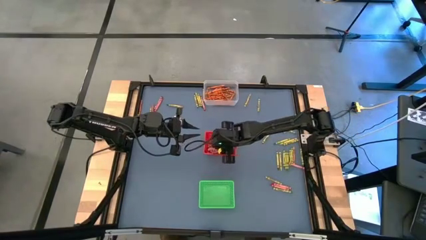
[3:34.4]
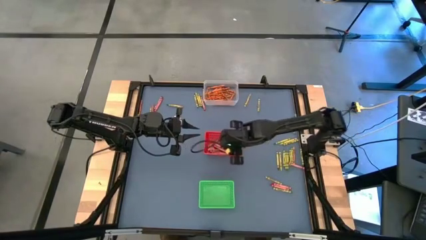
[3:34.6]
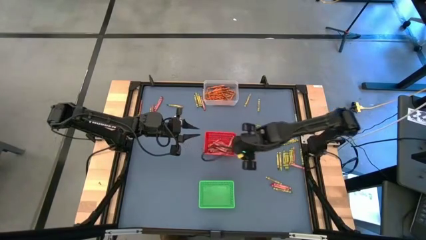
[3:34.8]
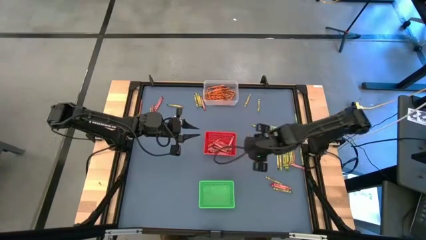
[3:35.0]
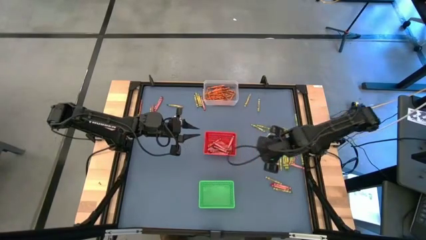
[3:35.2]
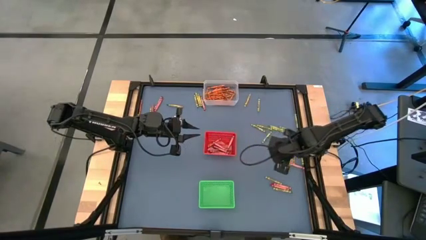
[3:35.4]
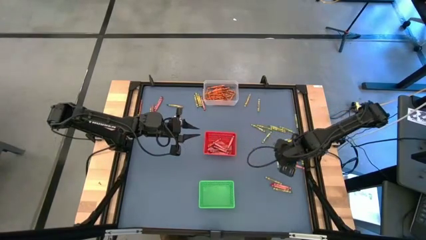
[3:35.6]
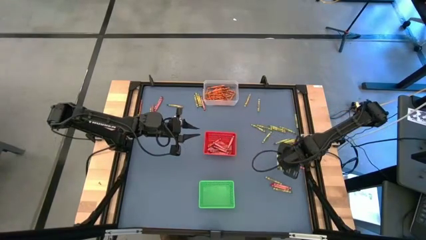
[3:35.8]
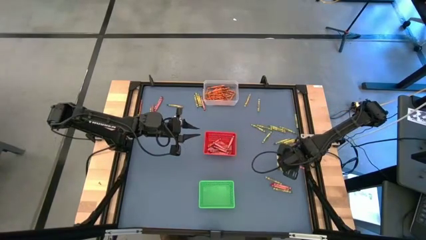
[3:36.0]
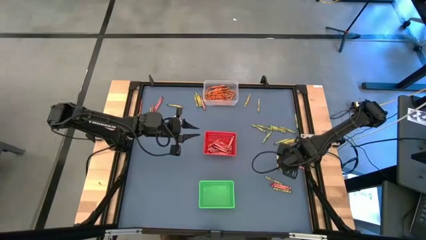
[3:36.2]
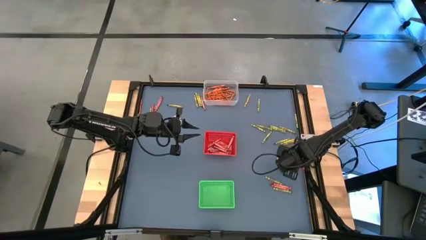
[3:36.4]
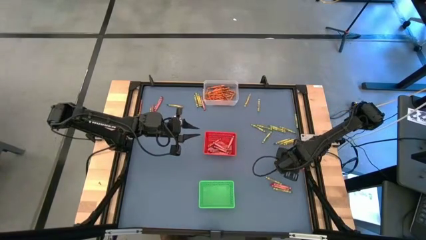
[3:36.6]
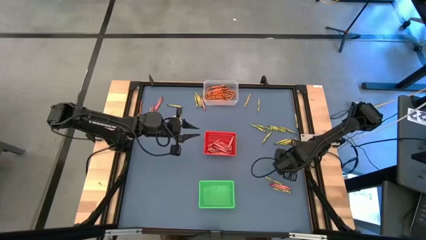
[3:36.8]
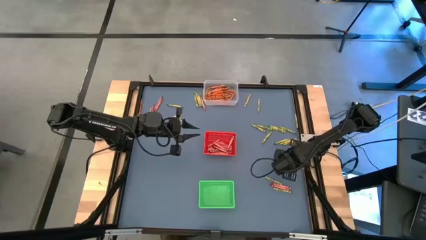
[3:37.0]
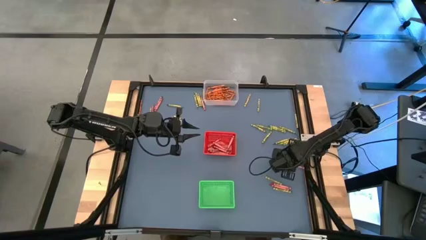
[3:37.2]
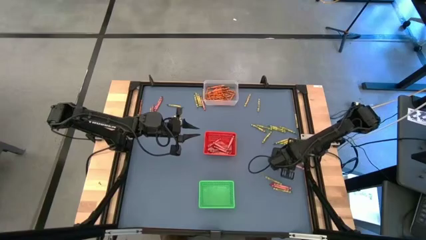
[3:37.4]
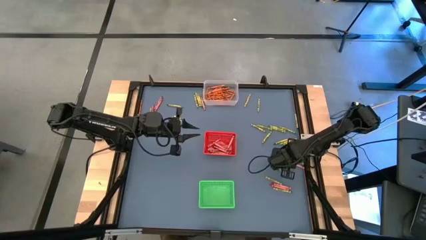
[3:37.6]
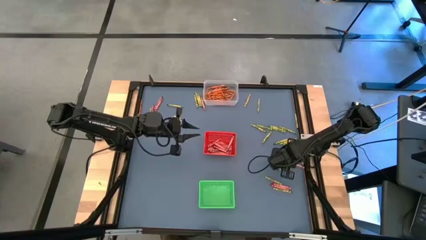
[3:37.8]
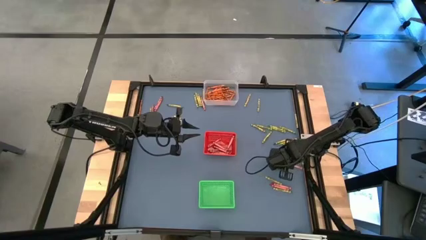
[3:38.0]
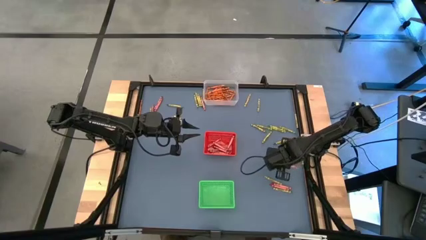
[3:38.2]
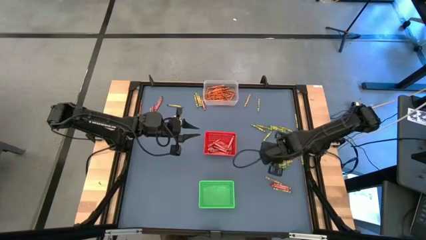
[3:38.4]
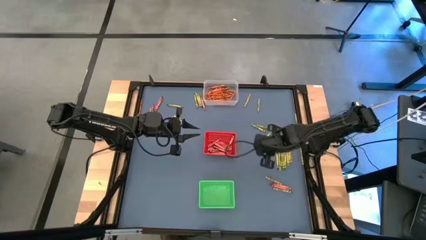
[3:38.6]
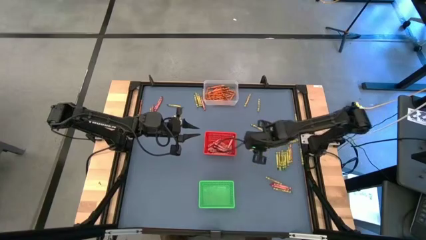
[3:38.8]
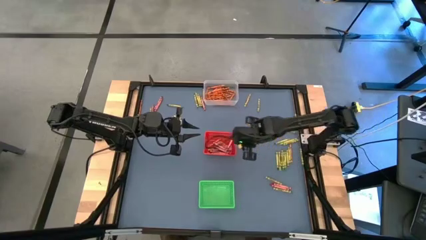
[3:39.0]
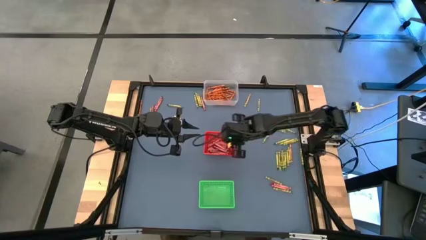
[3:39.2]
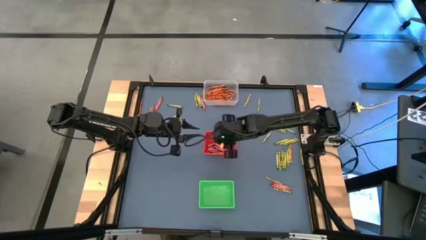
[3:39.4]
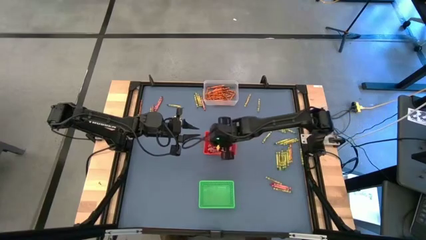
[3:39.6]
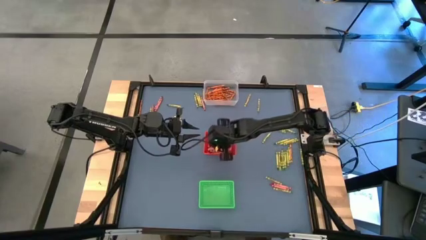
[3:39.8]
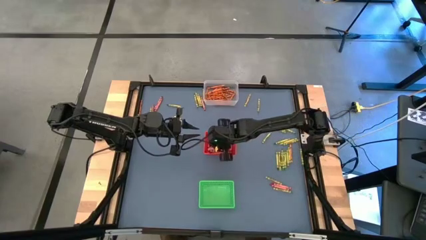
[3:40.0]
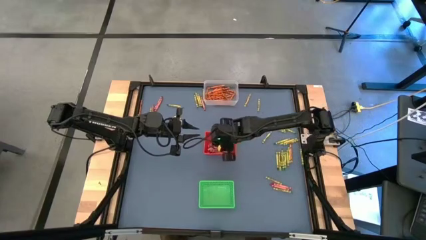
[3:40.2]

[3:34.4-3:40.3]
Task: Sort crayons
Put the red crayon into the red bin

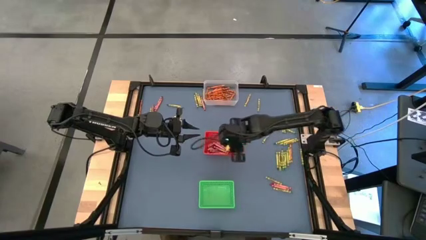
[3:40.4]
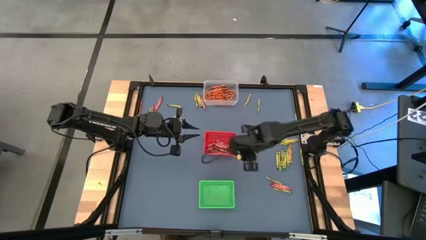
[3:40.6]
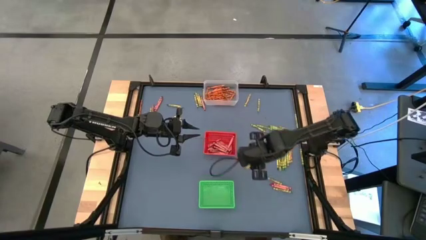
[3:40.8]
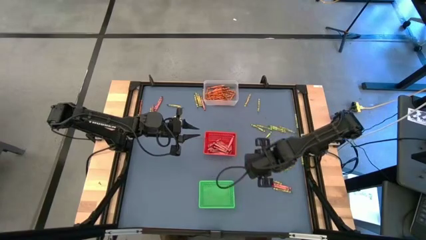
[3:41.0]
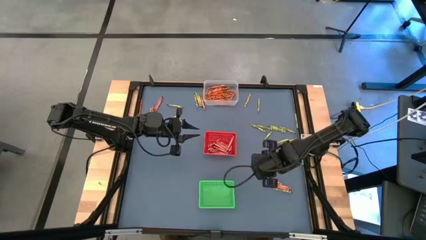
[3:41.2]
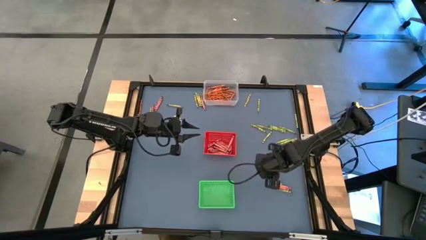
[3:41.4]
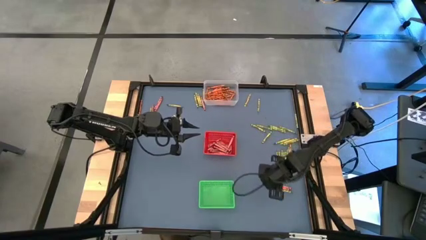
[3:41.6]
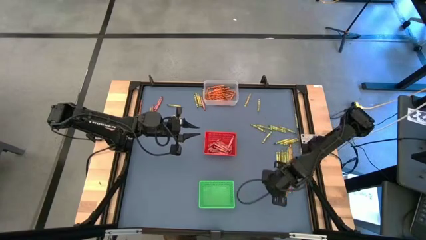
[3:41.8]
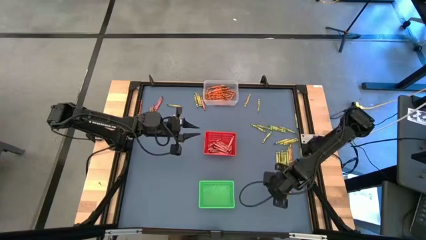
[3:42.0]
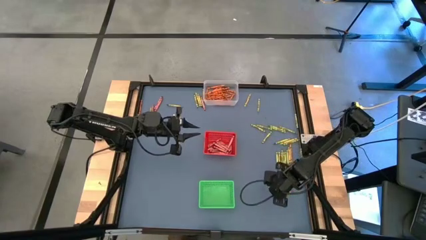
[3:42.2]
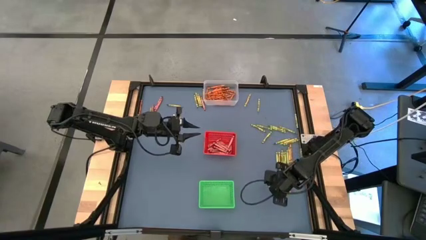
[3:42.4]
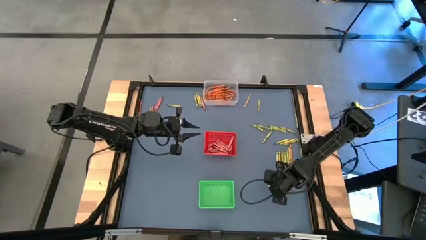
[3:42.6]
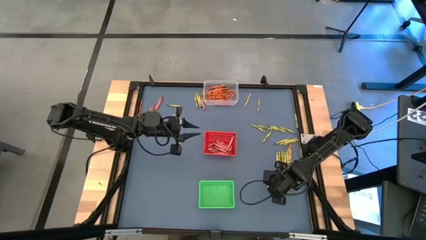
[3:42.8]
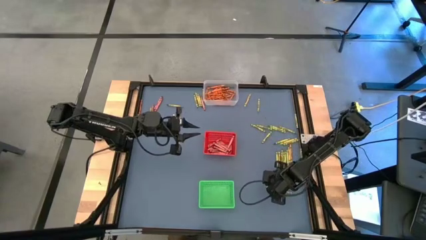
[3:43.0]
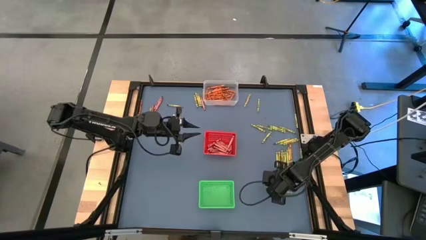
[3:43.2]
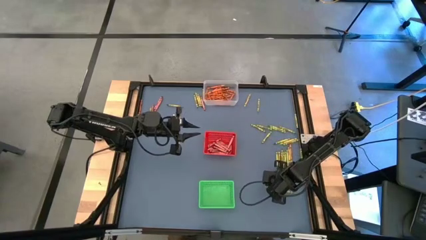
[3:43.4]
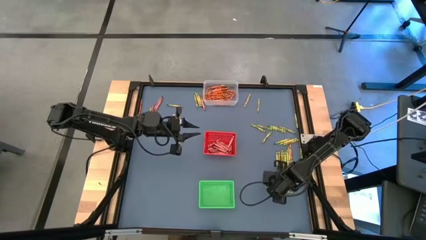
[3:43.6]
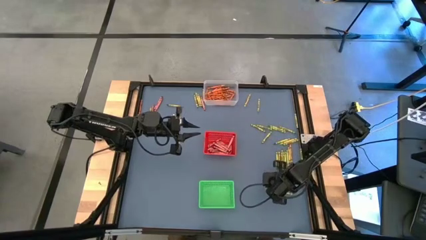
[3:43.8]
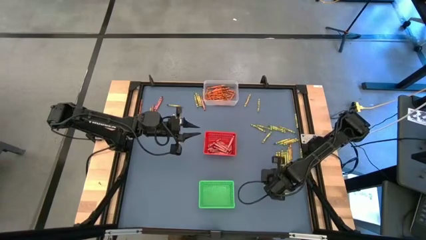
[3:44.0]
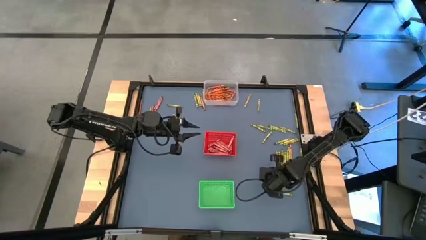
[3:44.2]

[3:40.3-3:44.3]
Put the red crayon into the red bin

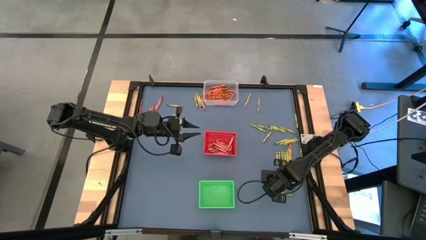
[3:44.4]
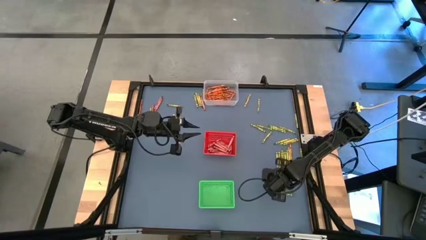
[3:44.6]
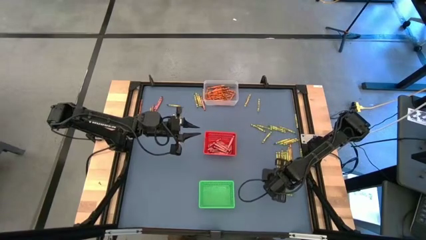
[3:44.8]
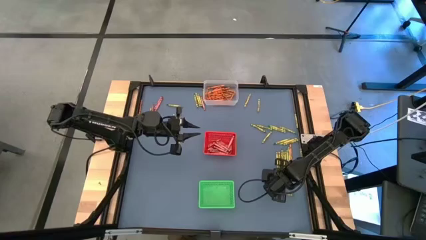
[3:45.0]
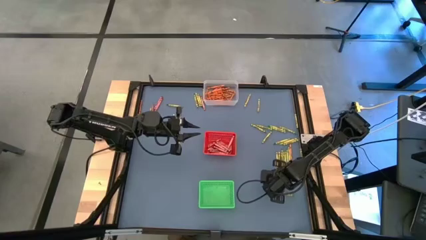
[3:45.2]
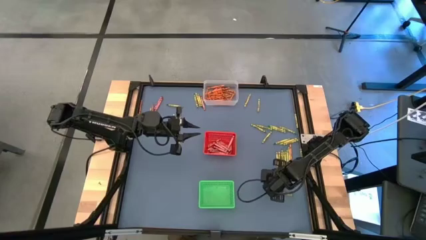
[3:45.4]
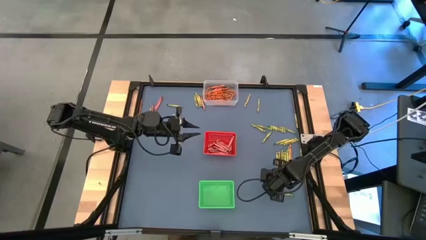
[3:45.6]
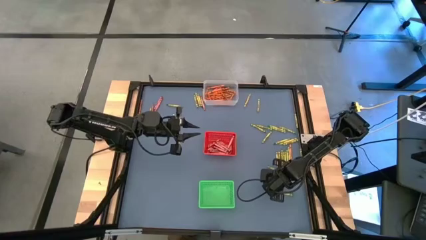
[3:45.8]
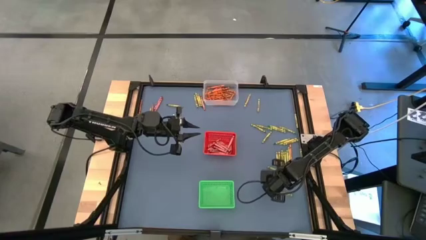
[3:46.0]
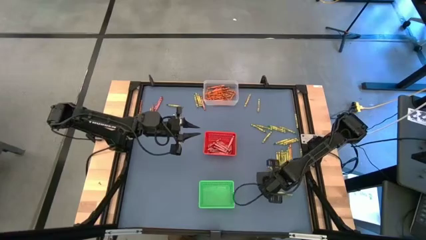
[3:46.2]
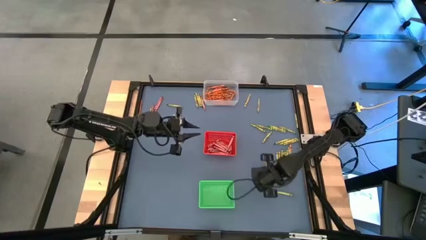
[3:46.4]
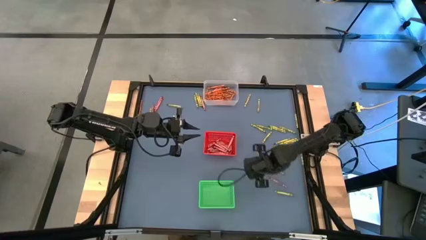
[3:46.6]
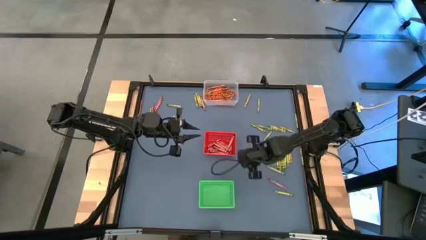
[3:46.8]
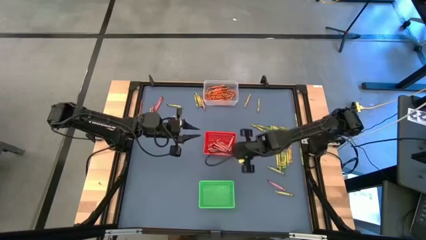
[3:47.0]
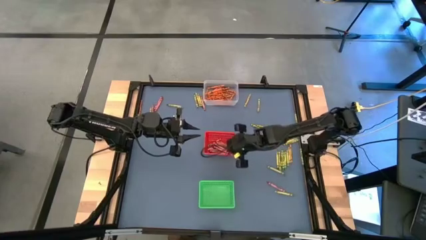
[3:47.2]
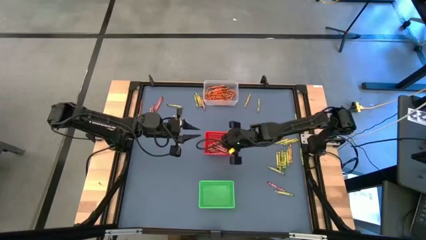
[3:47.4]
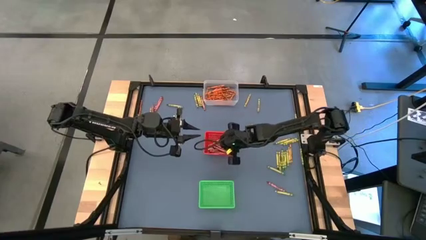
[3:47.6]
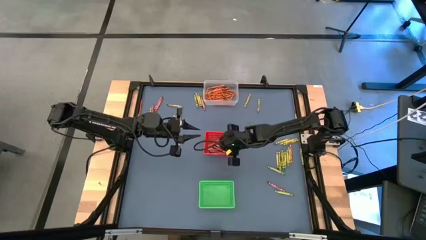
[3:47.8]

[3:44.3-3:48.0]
Put the red crayon into the red bin

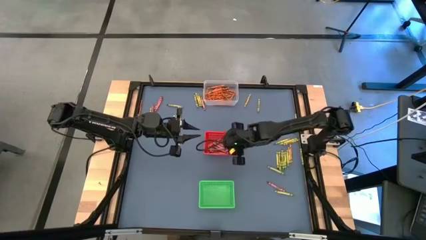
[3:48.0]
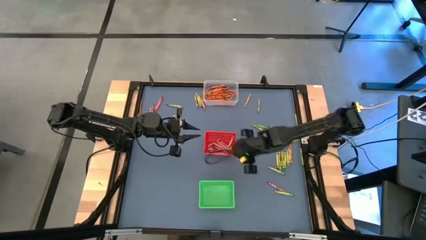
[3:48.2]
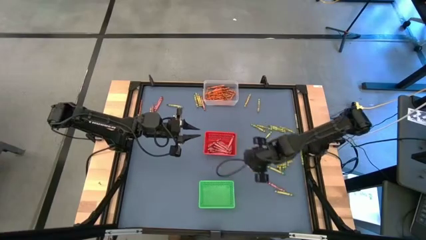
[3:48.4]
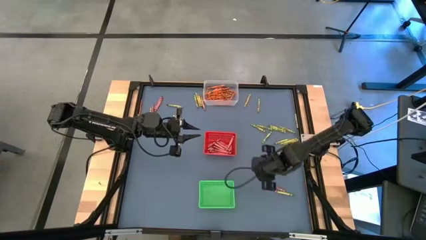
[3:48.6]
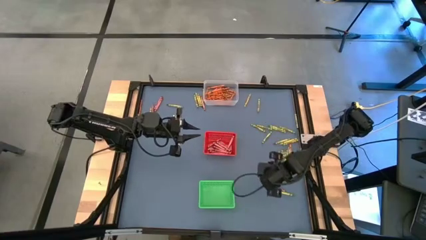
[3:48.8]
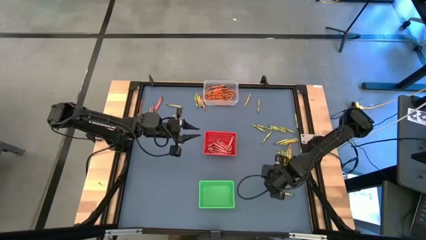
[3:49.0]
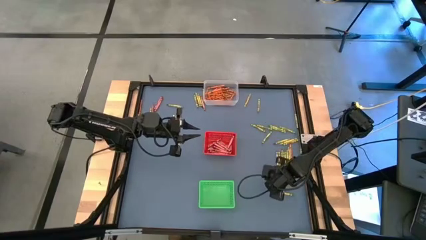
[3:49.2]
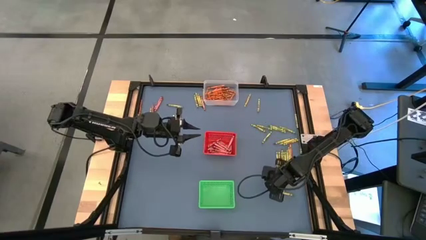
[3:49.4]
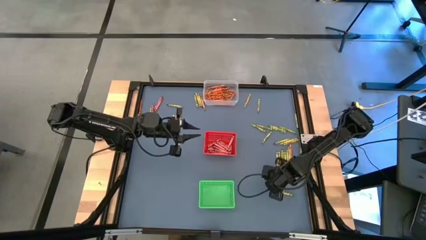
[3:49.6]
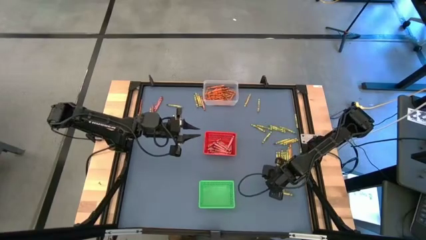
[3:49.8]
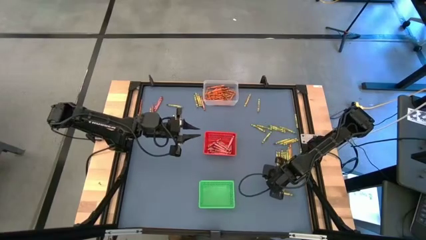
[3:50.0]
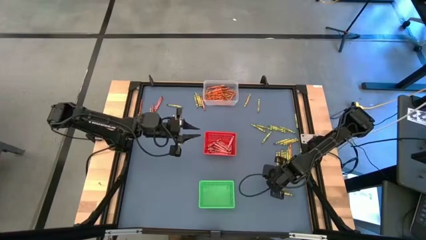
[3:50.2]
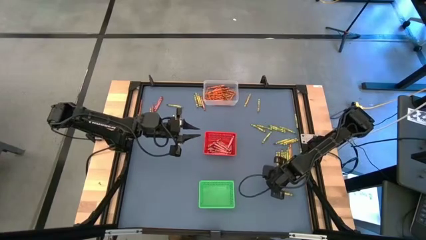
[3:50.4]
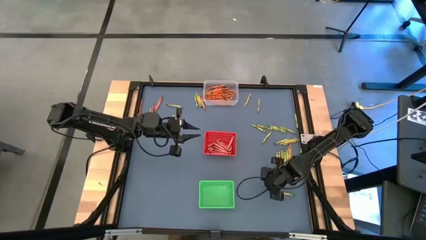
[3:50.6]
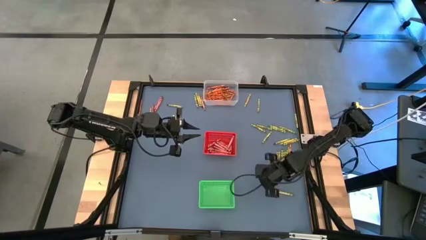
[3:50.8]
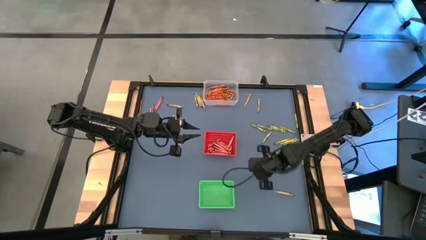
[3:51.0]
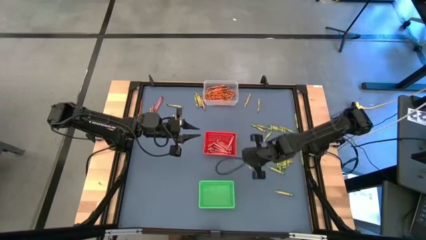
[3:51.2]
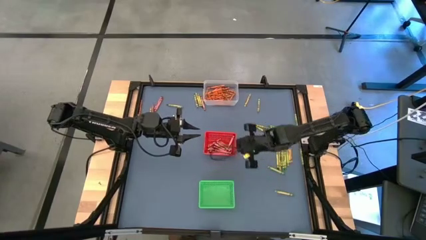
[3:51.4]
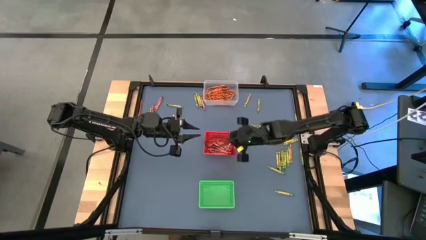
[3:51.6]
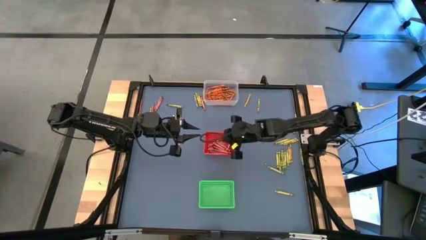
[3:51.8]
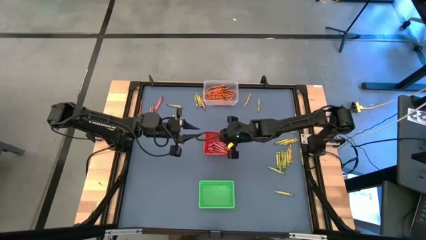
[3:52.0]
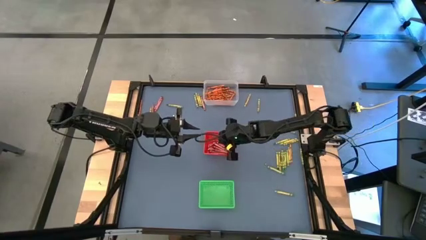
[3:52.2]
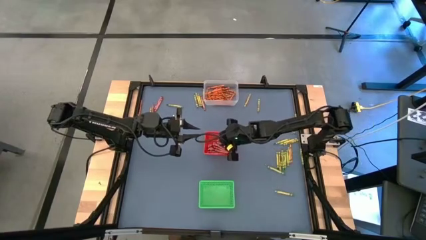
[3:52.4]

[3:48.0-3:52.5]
Put the red crayon into the red bin
